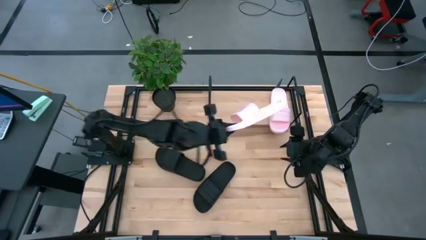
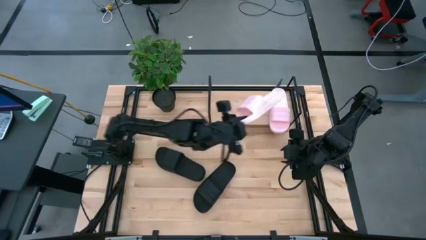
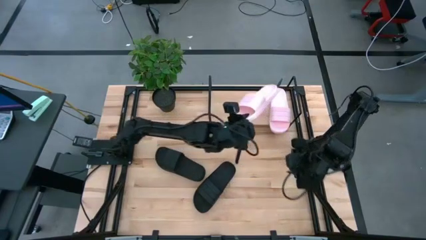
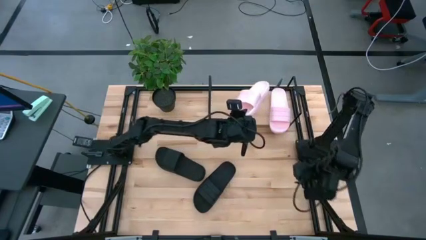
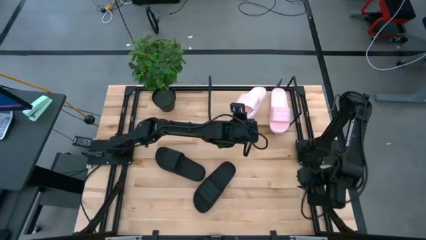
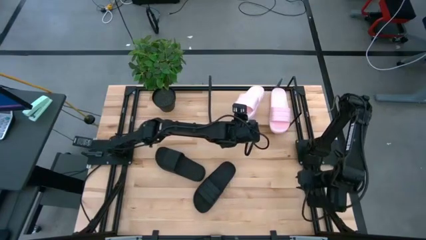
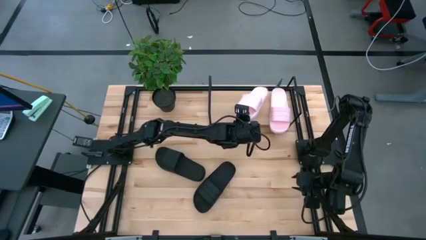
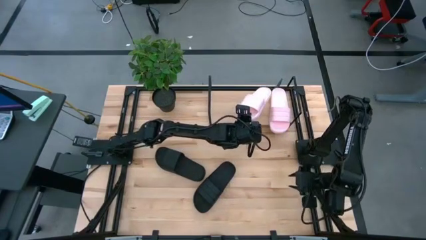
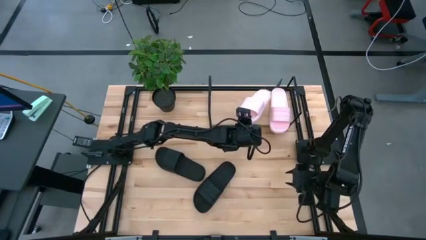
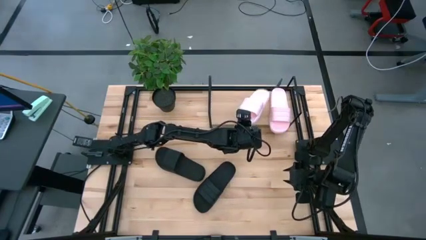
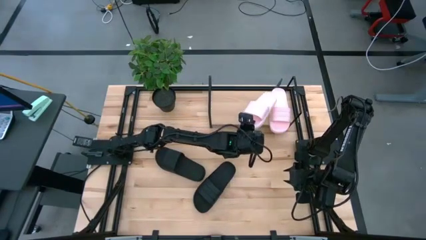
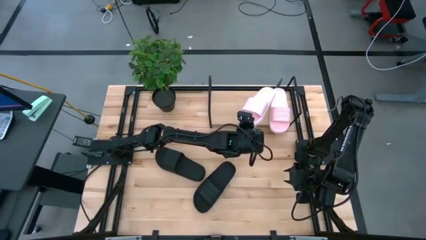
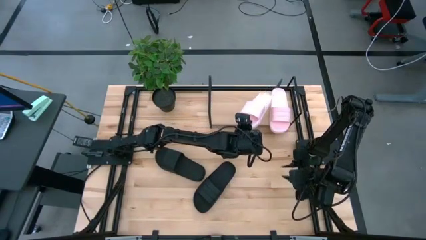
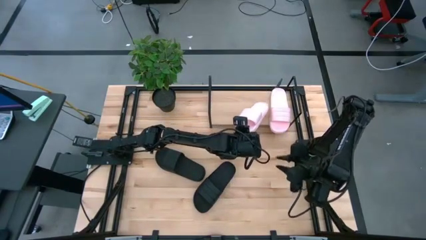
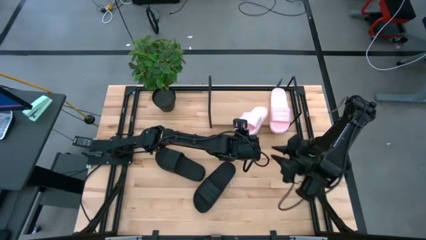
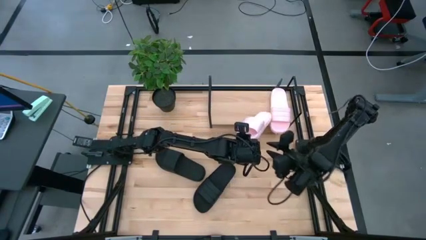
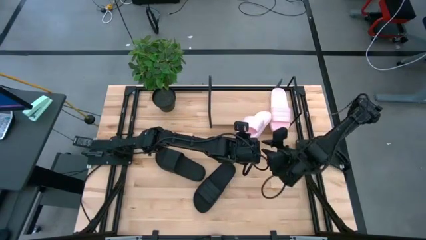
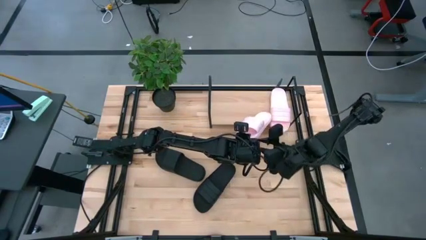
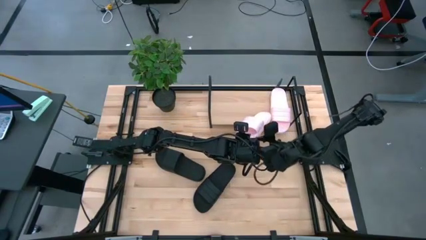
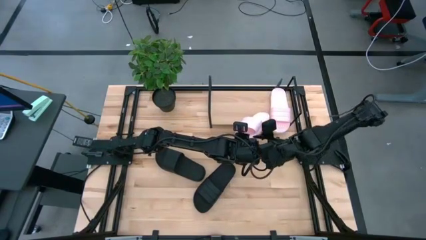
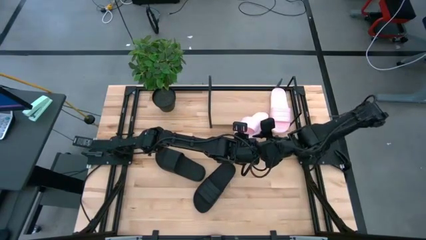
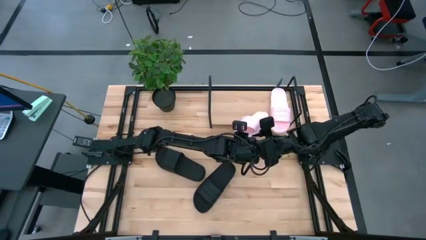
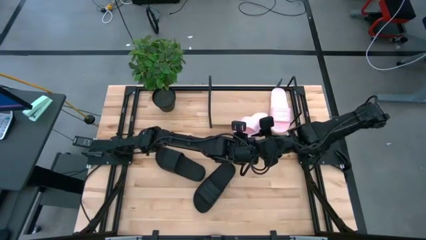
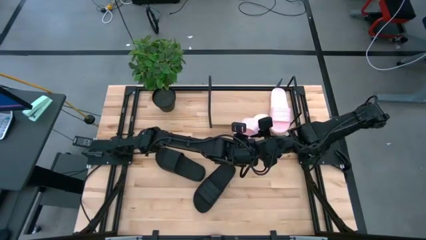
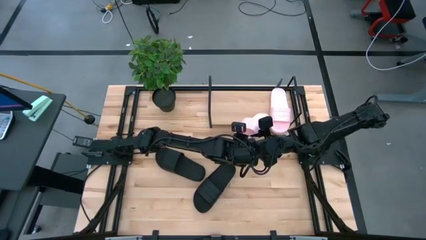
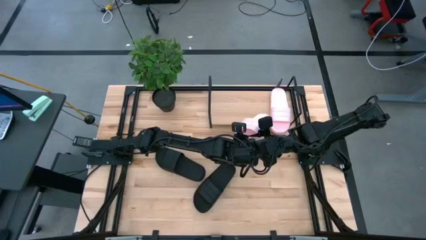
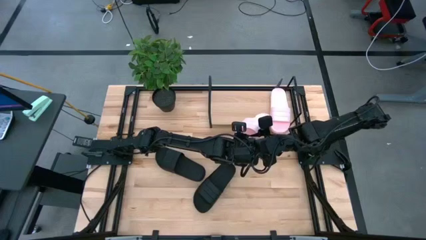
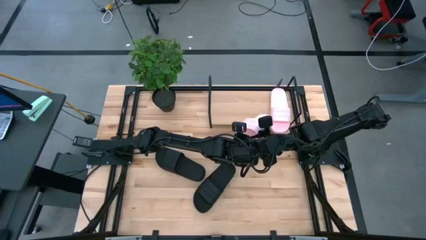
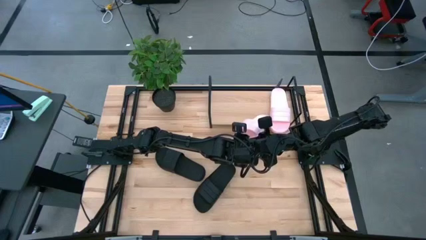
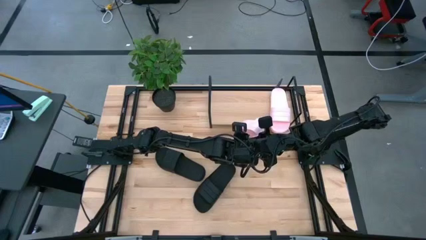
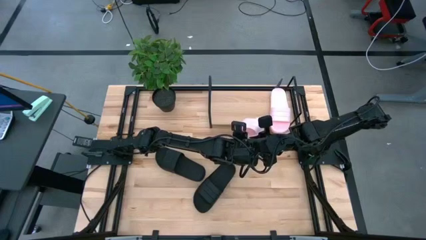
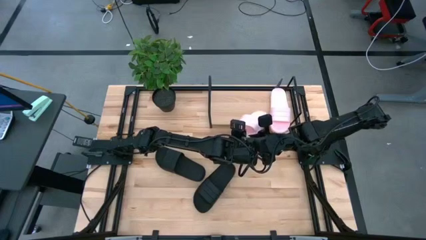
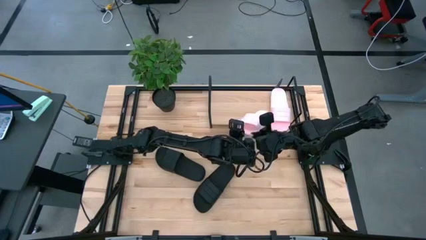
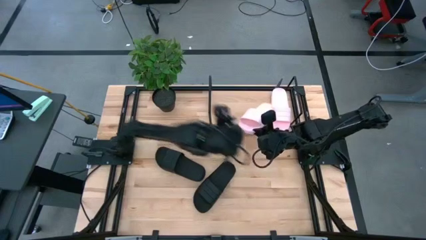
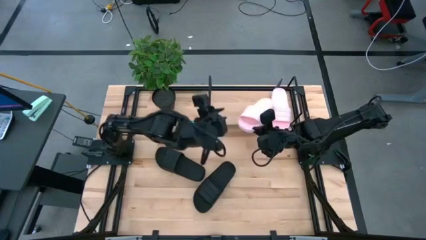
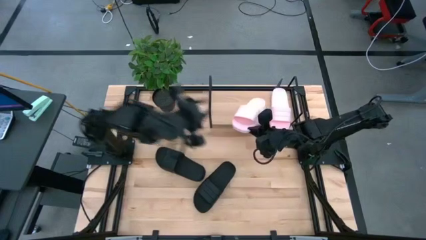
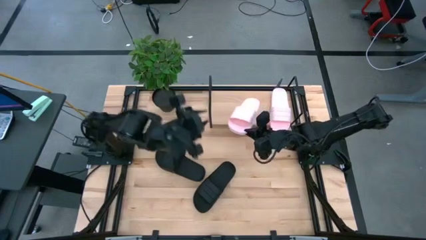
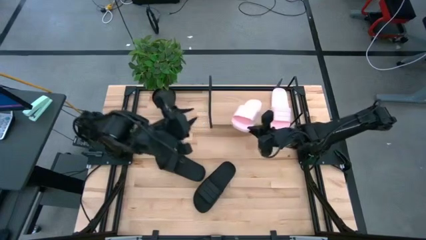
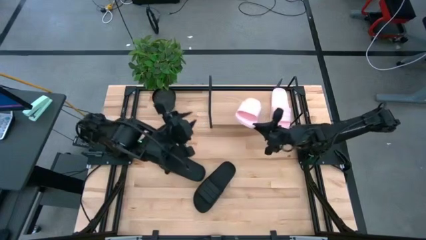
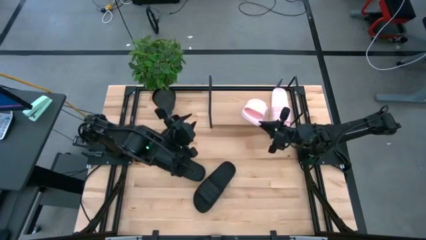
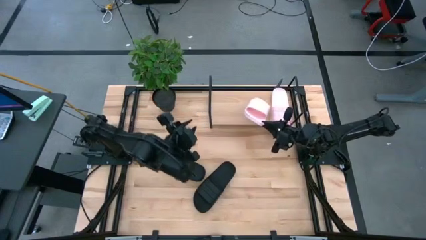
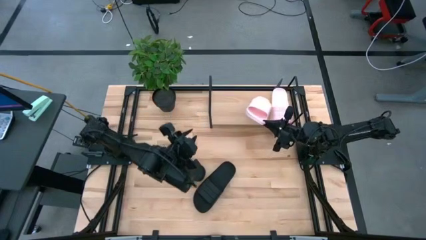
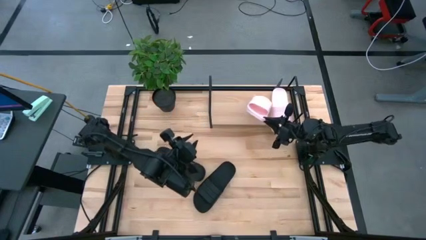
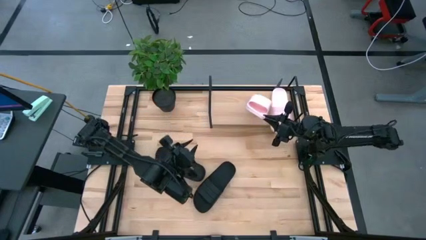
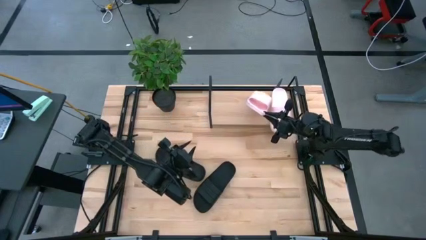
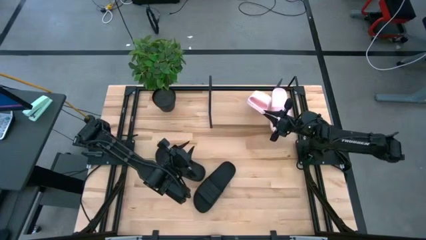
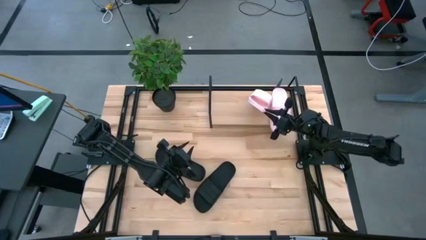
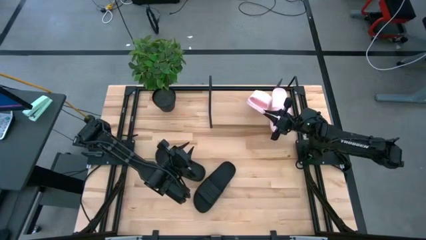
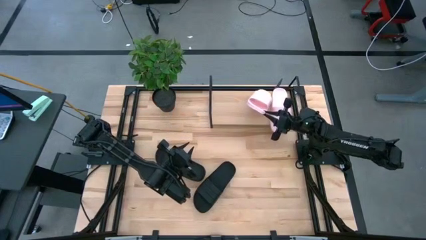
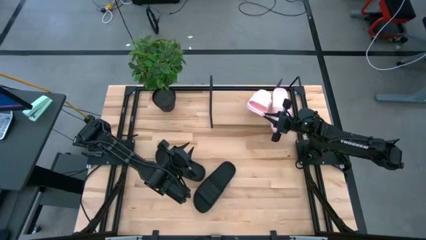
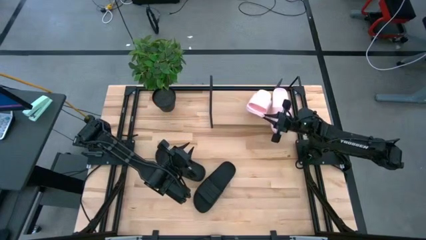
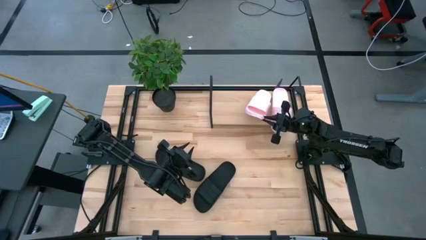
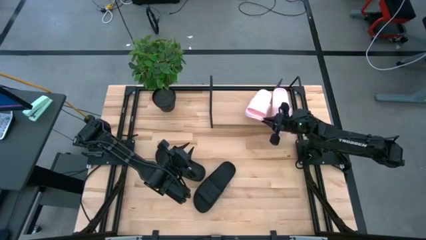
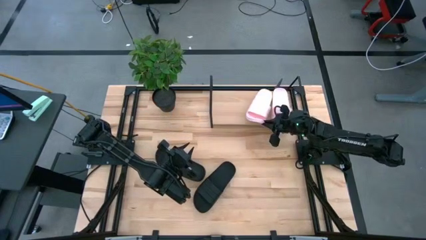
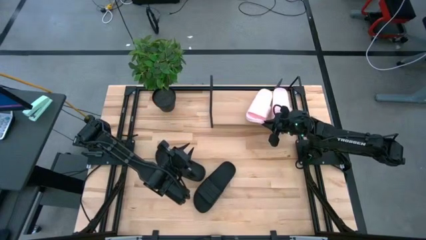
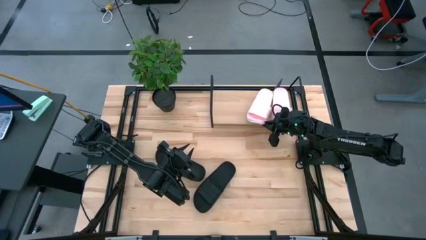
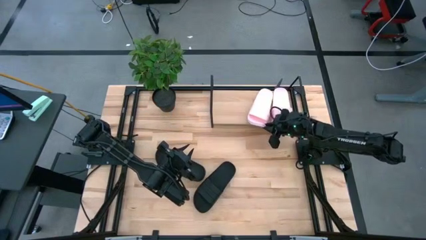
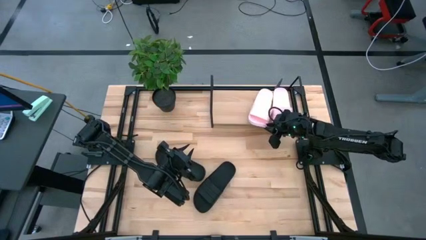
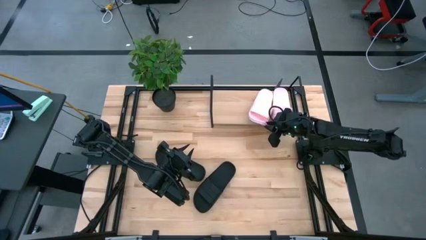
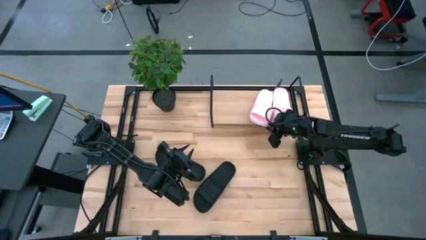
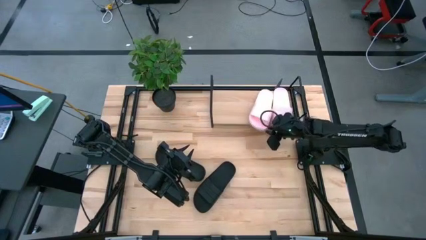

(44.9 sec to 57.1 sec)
Task: Pick and place slides into the shelf
Put the pink slide on the shelf

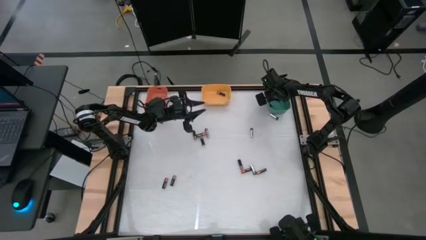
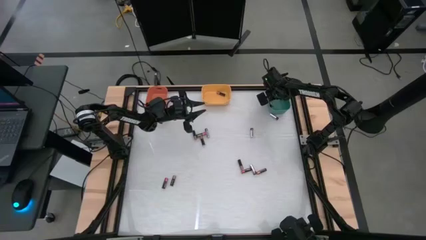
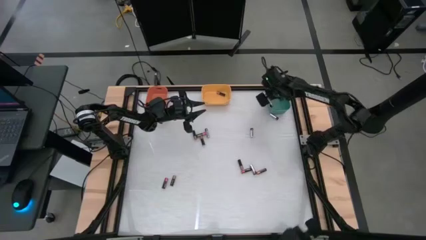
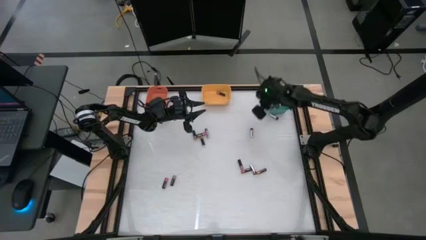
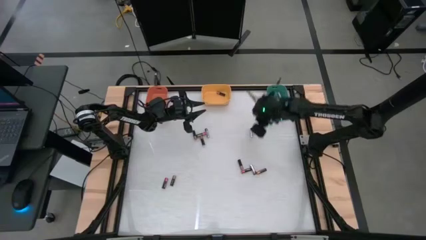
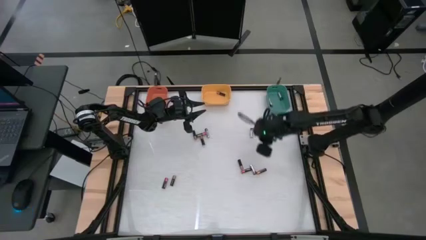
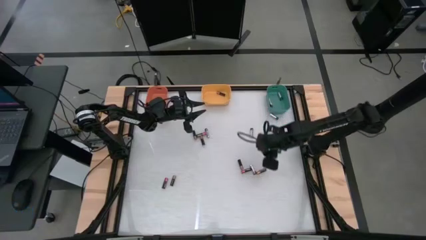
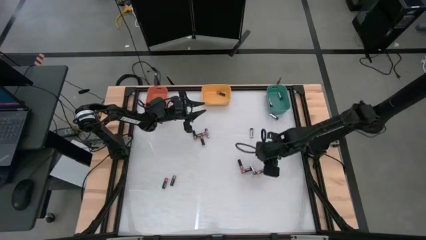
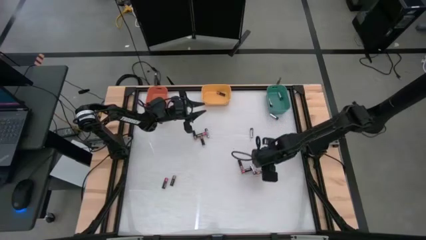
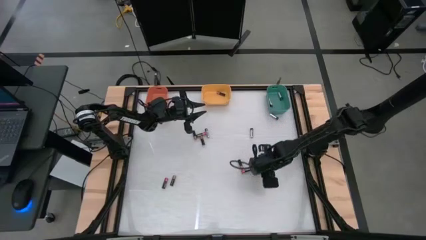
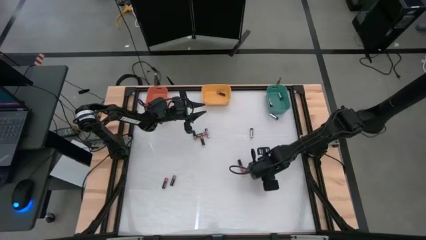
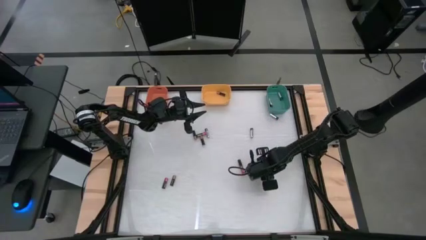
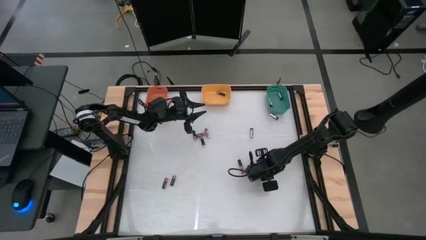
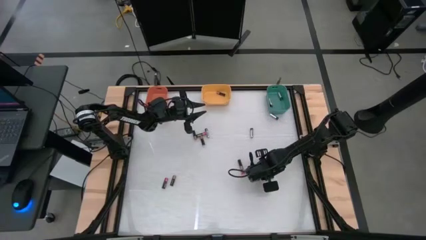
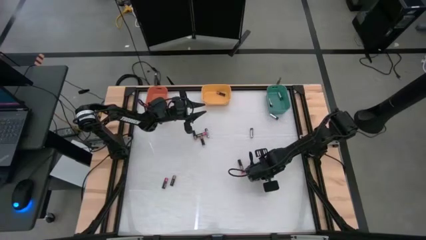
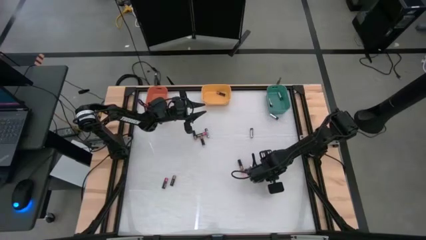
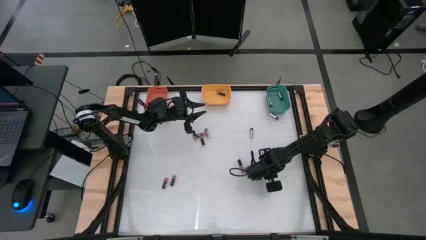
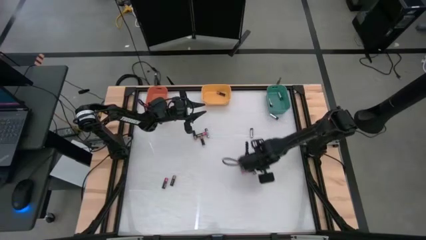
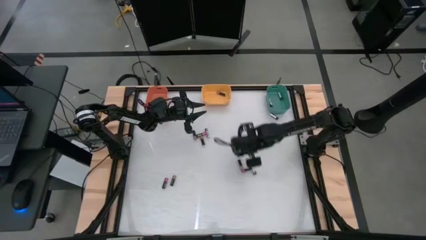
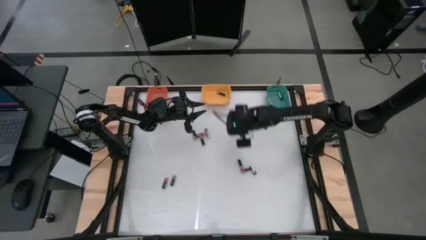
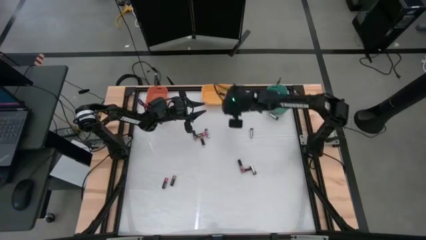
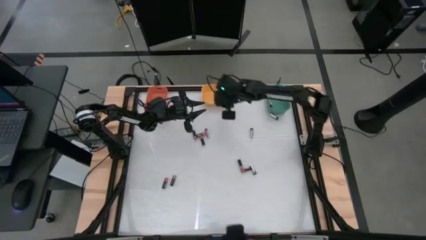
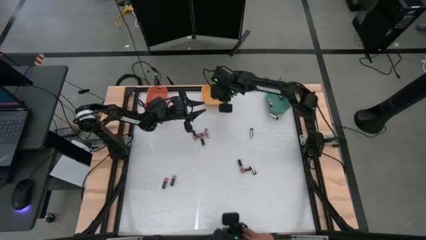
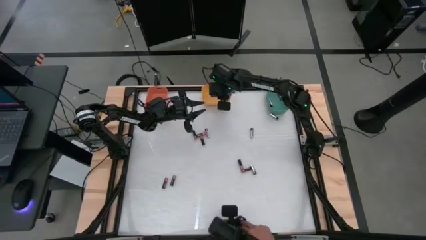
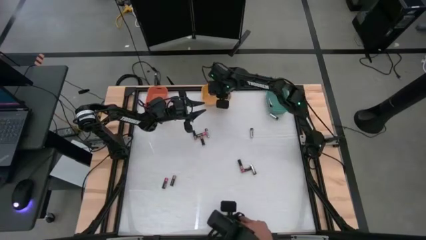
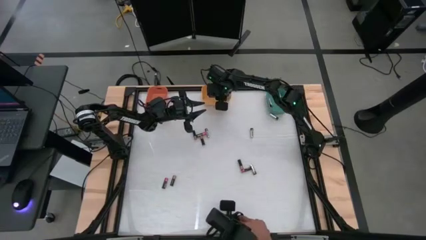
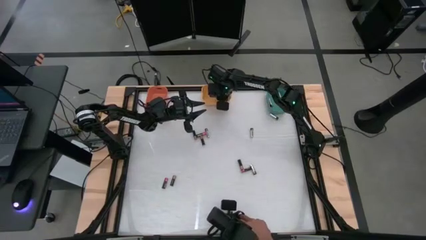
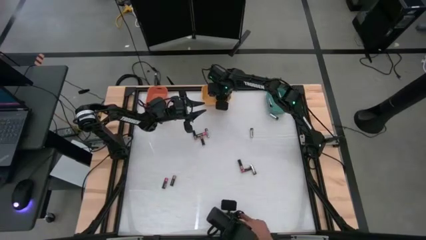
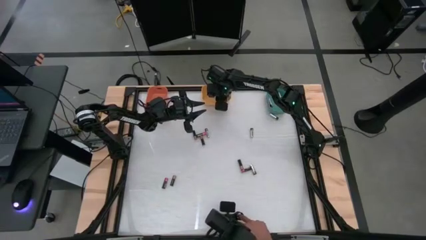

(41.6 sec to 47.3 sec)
Task: Sort batteries
Put the gold battery into the yellow bin
